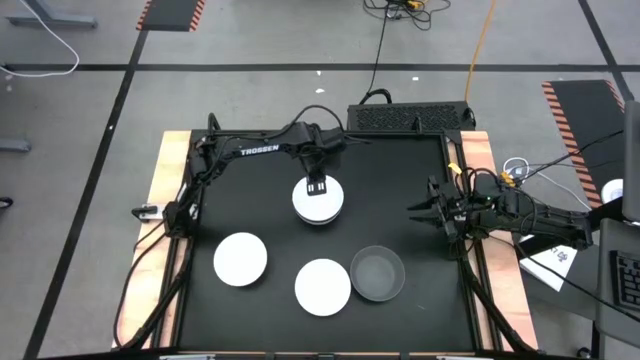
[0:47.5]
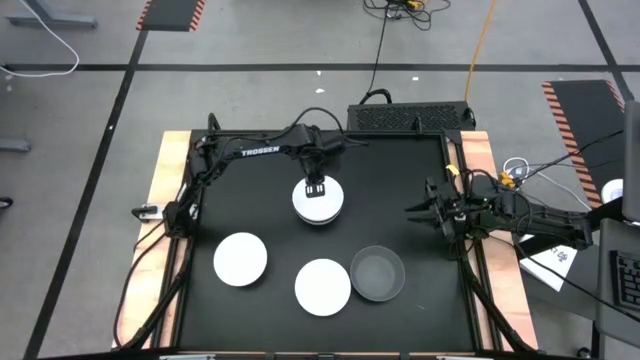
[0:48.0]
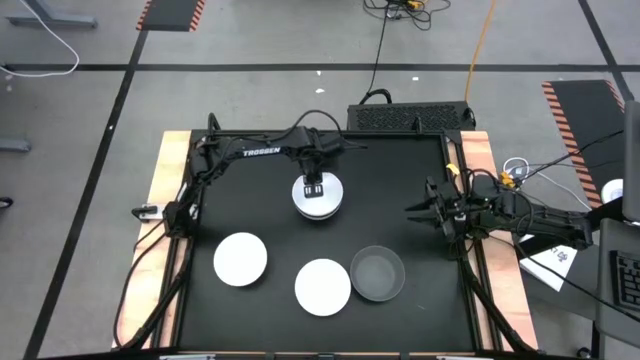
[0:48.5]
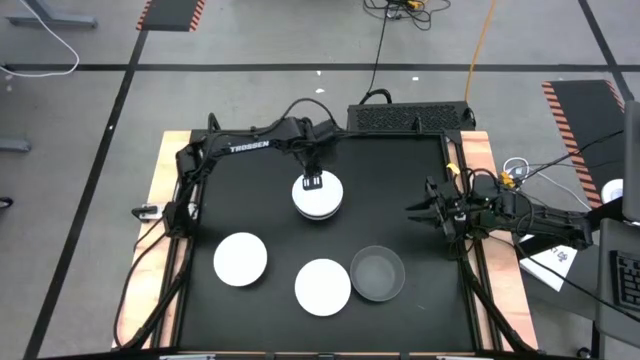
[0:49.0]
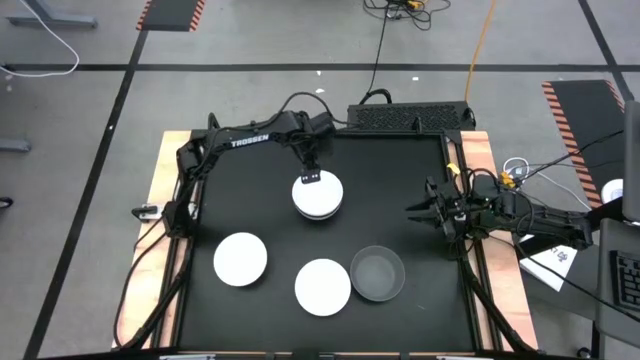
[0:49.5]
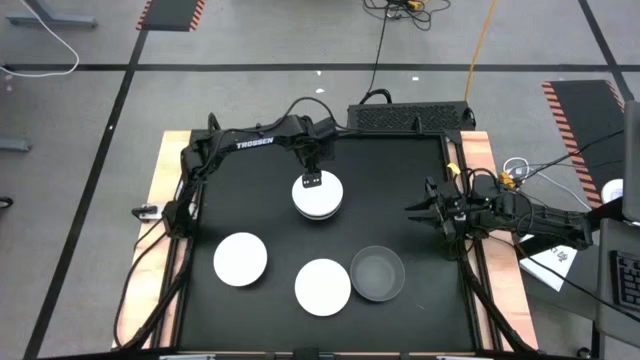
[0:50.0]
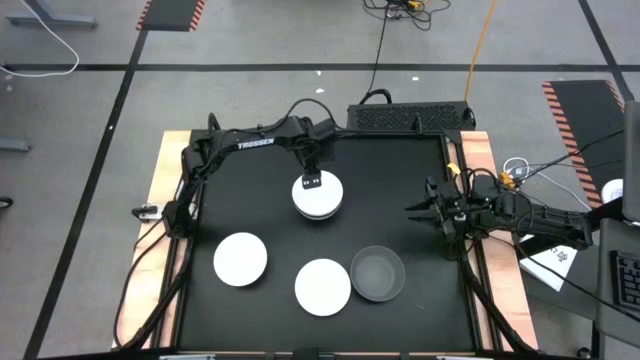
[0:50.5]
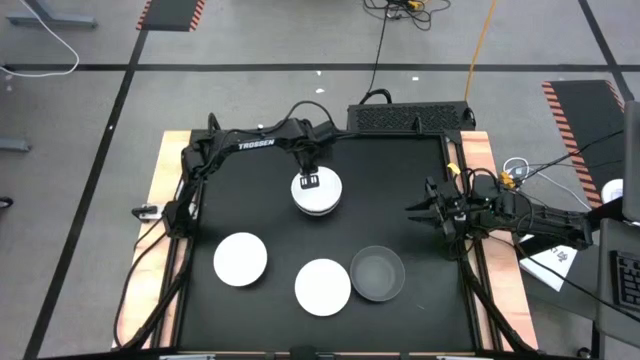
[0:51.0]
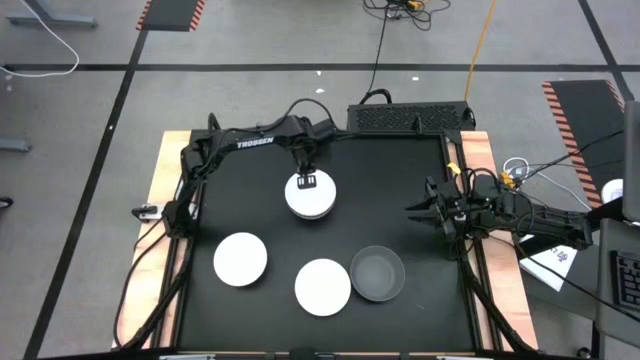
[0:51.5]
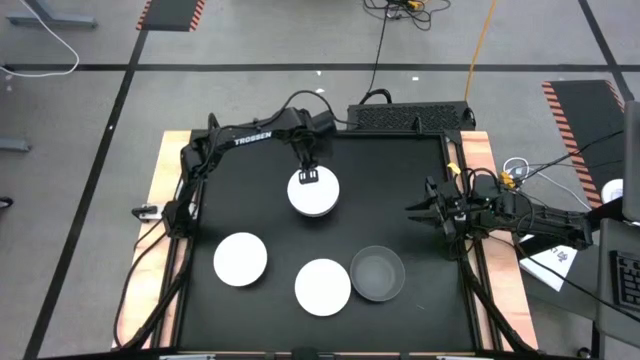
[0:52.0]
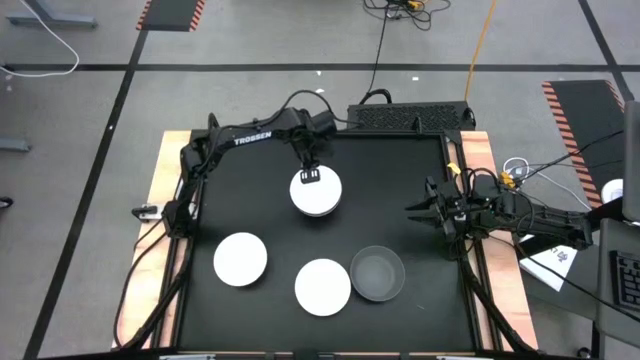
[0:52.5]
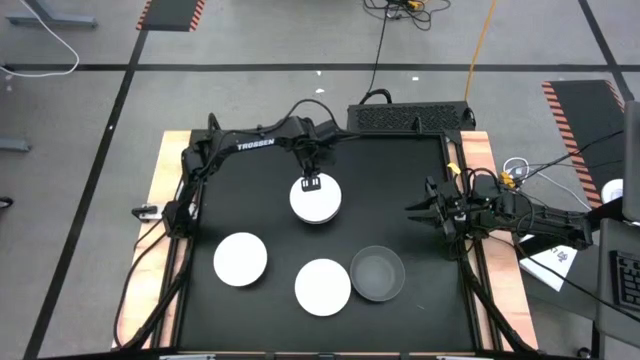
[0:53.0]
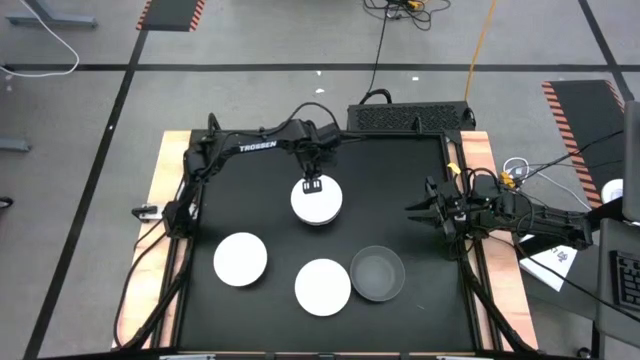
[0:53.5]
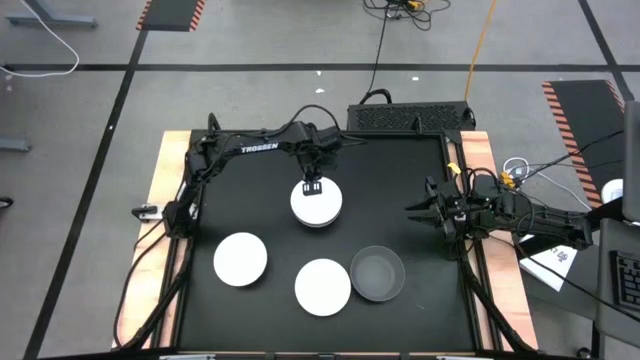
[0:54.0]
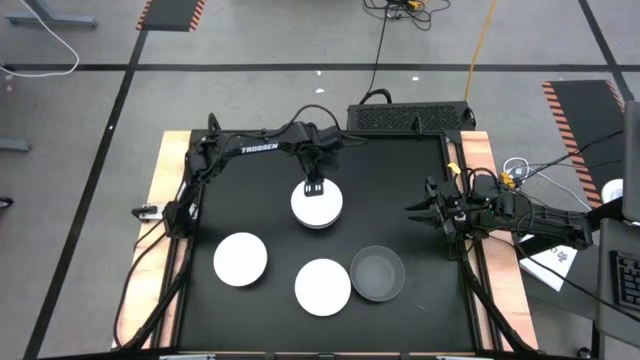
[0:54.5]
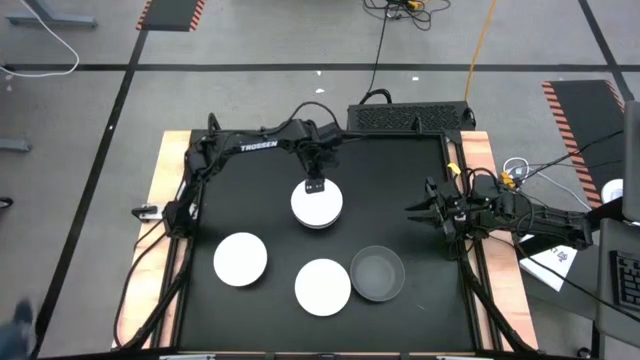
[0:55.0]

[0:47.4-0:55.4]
Task: Nest bowls inside each other
Adjust the stacked bowls

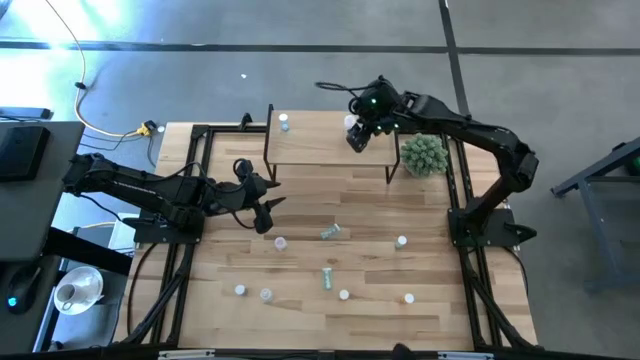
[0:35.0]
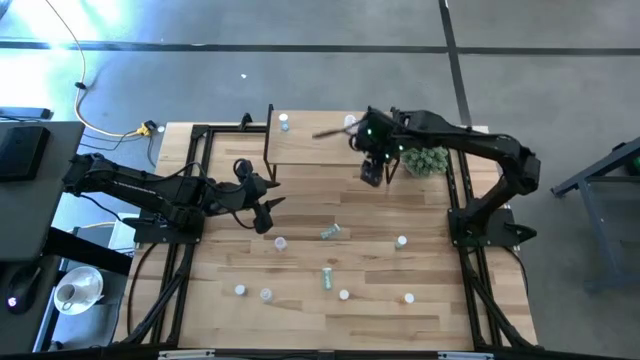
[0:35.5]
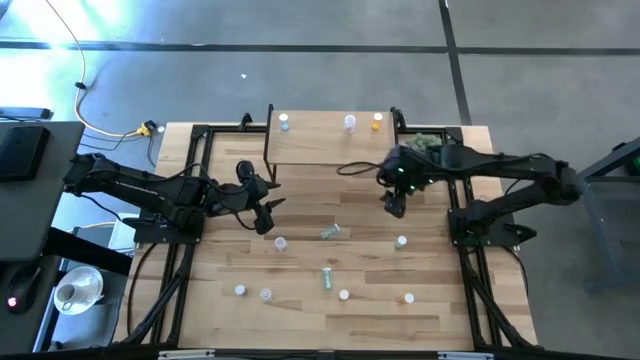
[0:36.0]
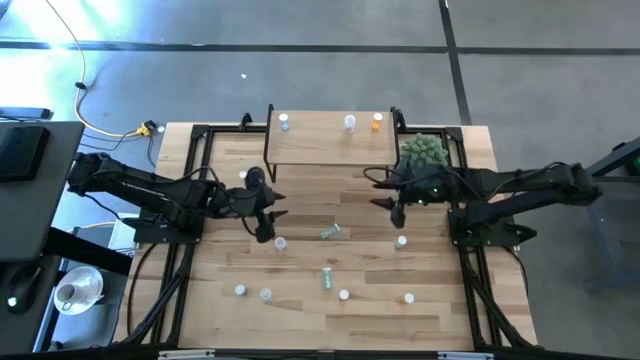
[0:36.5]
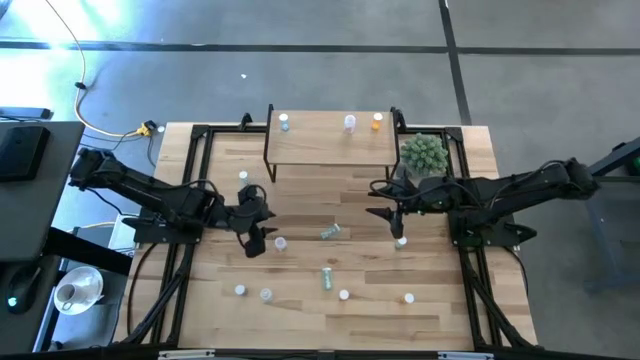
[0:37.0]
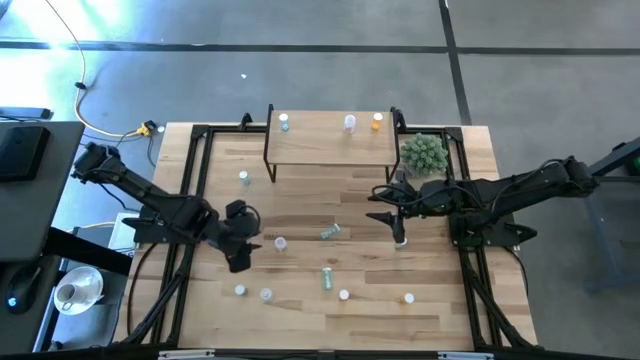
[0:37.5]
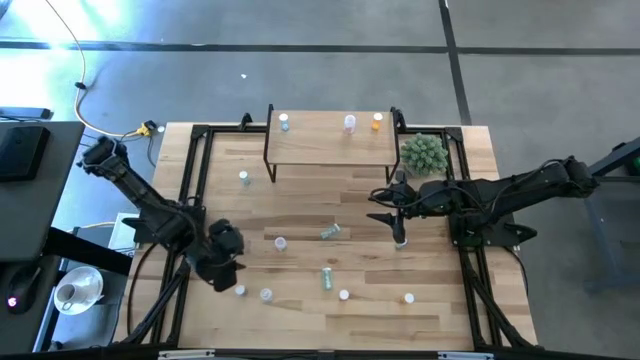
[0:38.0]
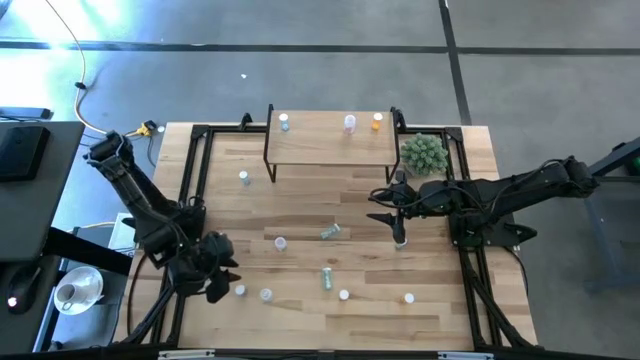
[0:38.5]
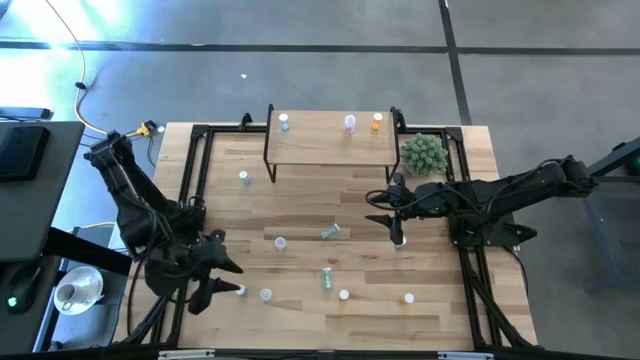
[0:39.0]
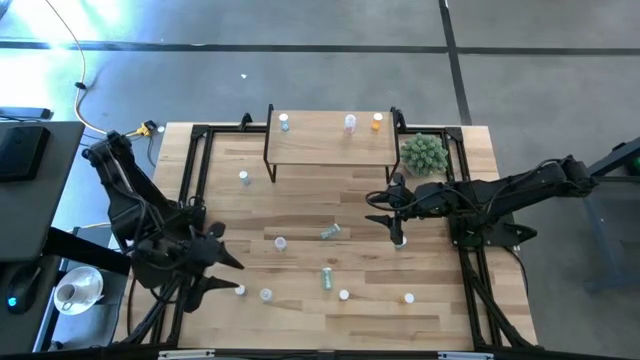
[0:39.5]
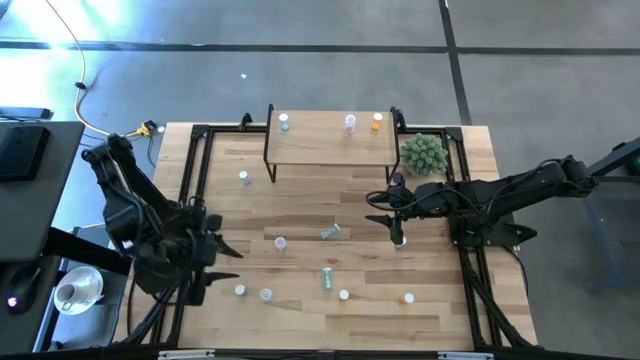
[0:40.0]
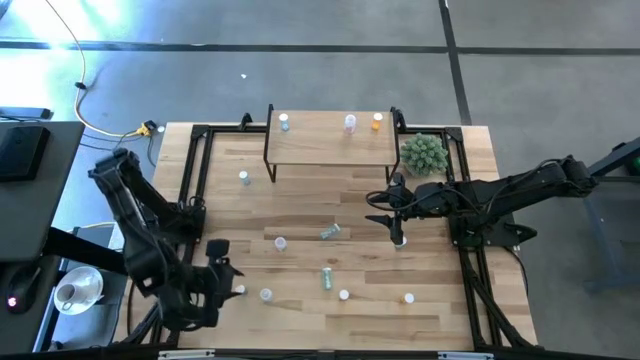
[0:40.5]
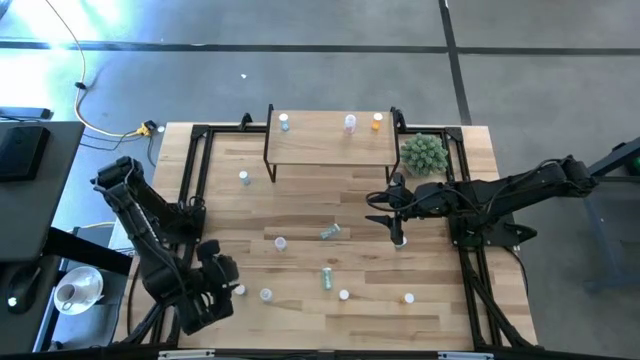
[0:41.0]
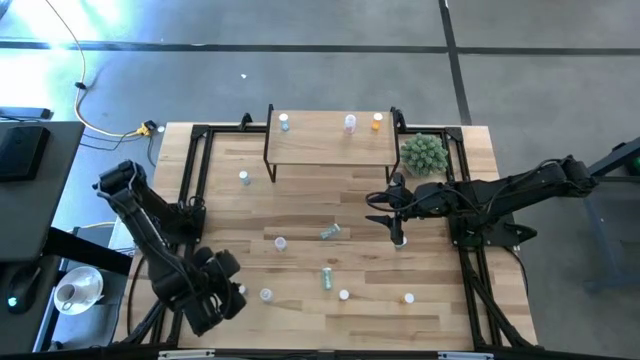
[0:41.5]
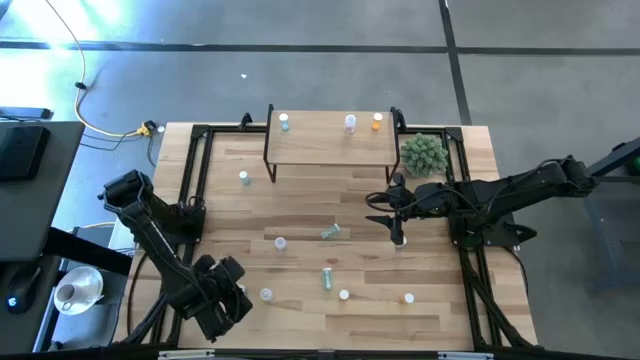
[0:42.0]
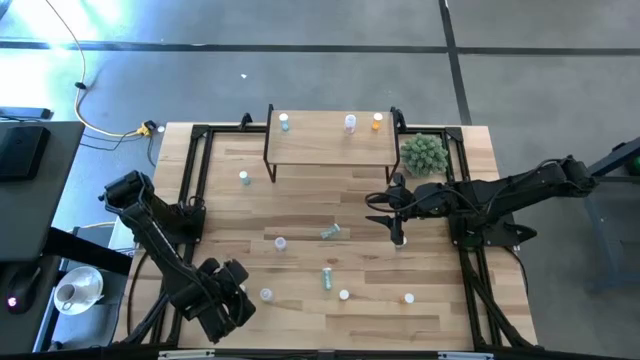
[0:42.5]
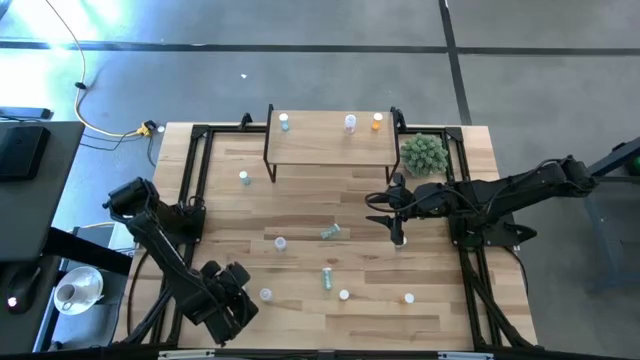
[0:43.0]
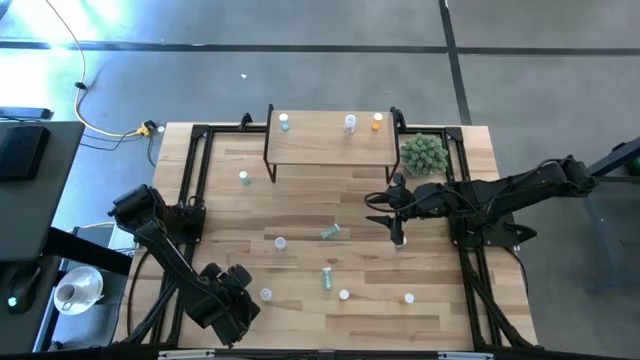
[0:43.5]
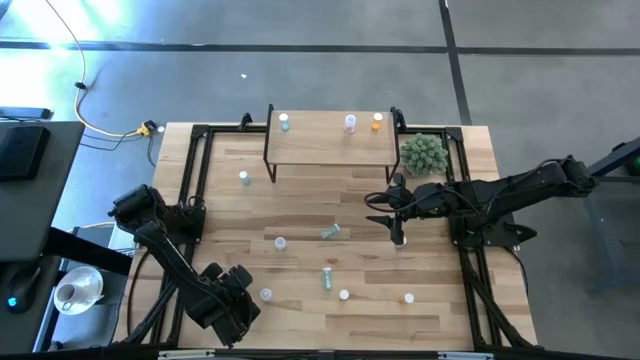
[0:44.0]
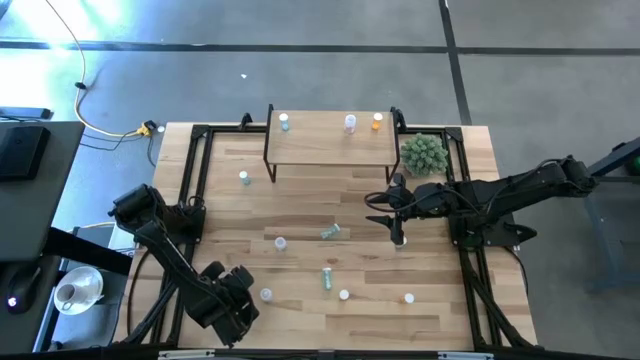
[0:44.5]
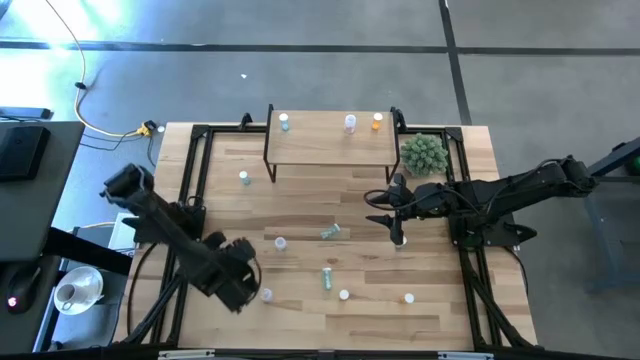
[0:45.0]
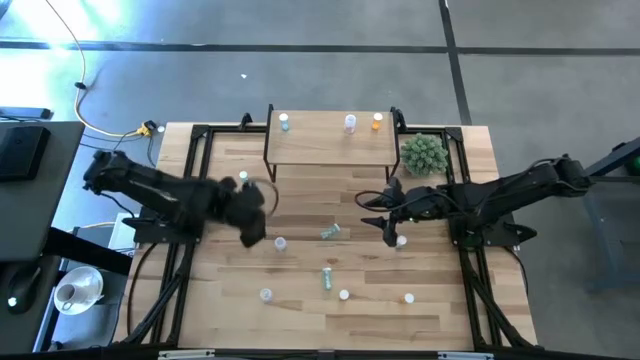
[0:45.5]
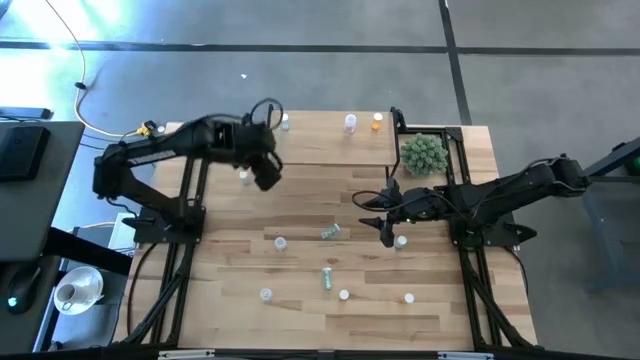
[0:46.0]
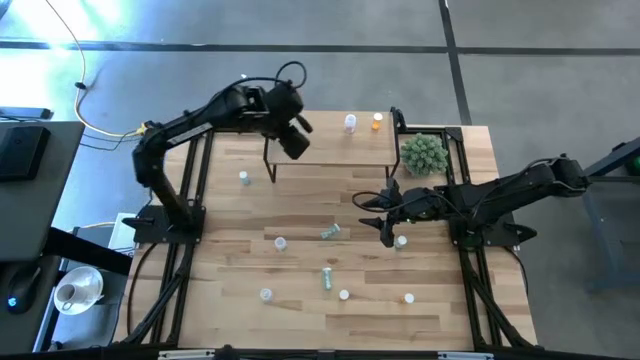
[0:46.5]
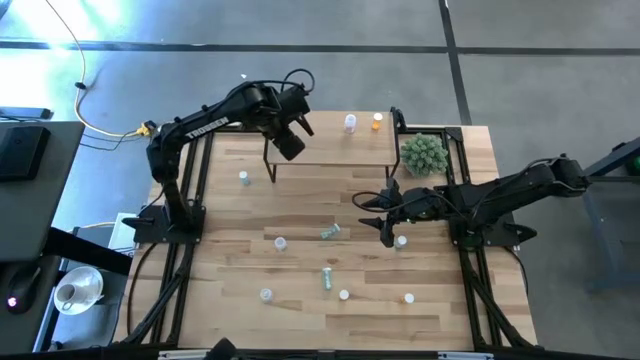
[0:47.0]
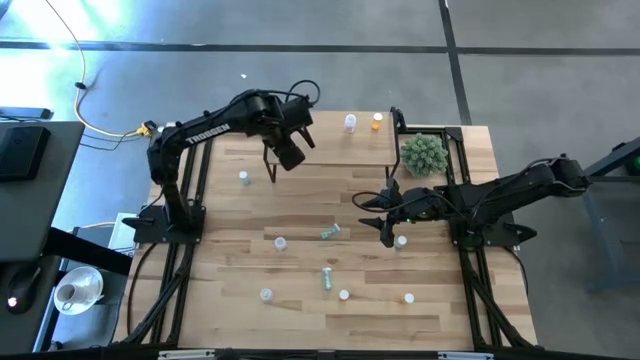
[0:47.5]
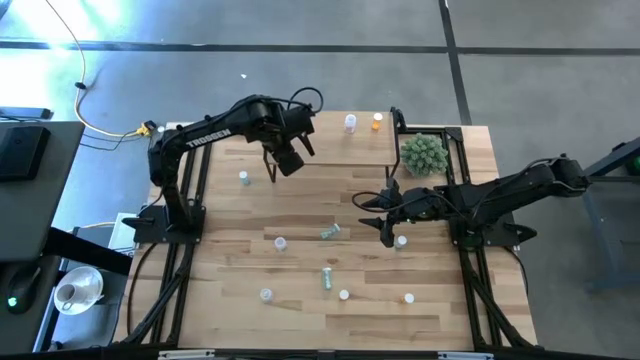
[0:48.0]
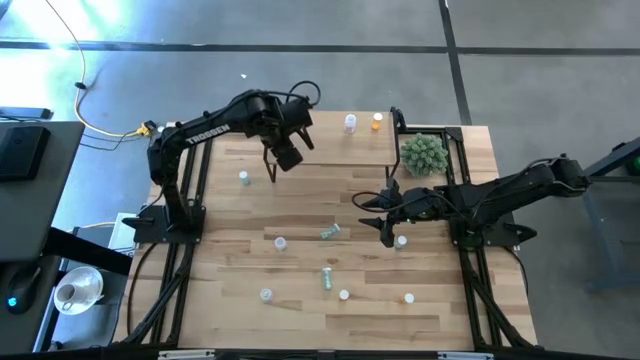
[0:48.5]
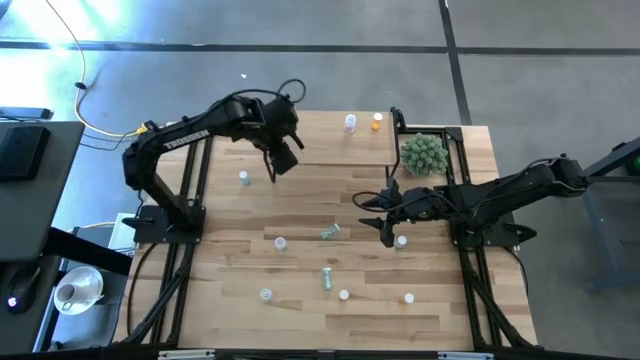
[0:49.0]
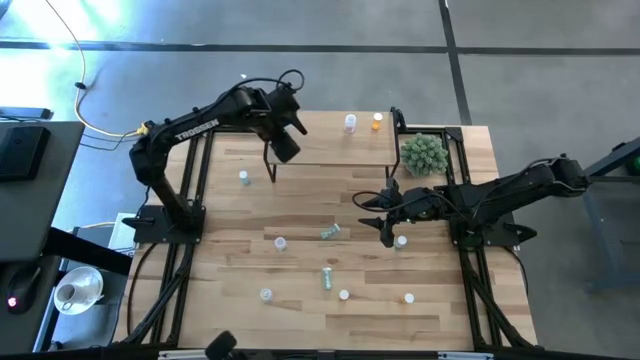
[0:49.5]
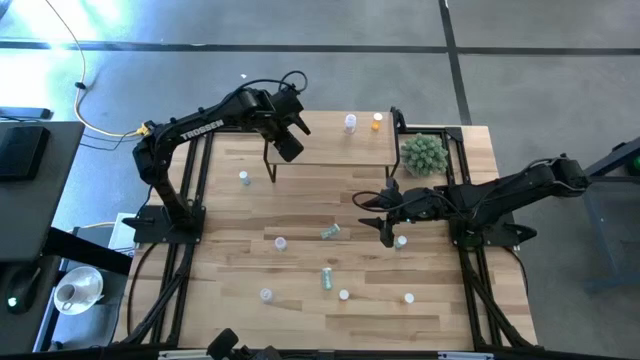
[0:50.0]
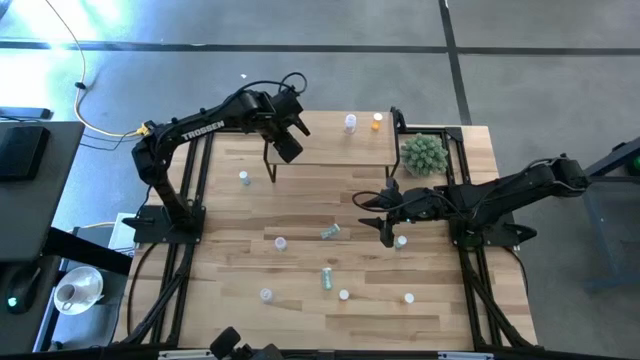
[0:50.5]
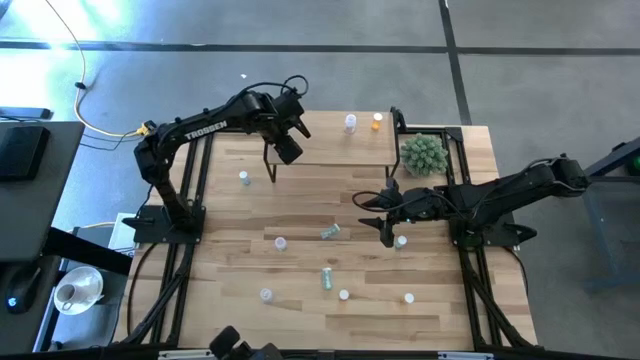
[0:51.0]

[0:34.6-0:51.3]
Task: Pick and place medicine bottles onto shelf by color
Put the bottom blue pill bottle on the shelf aligned with the other blue pill bottle
